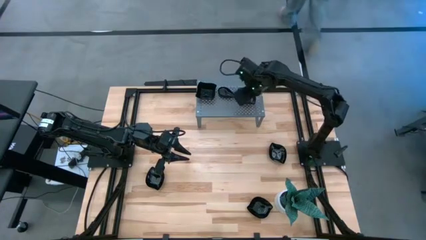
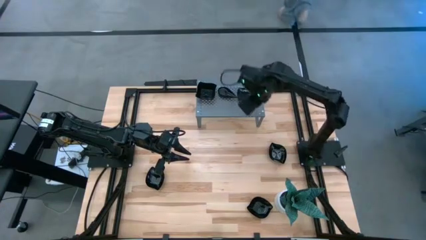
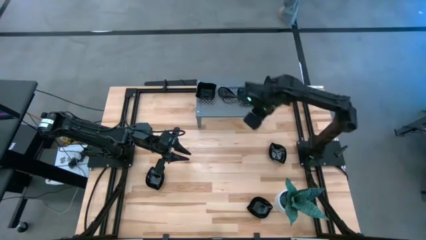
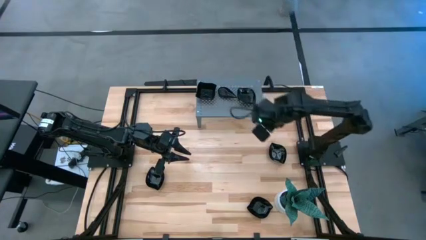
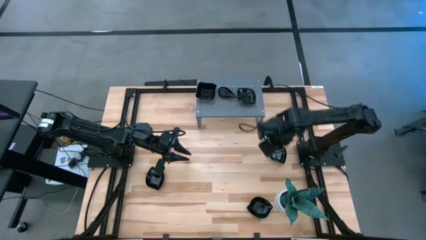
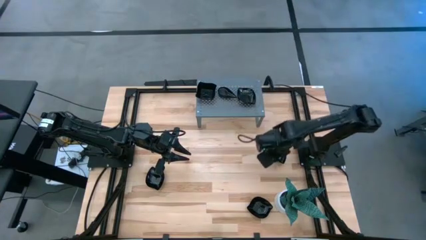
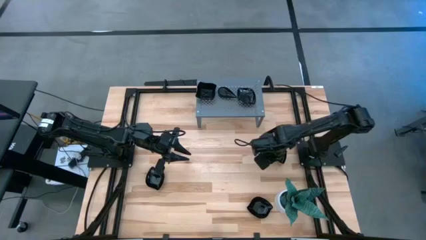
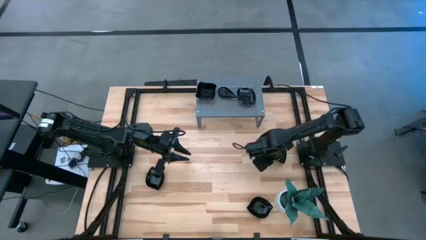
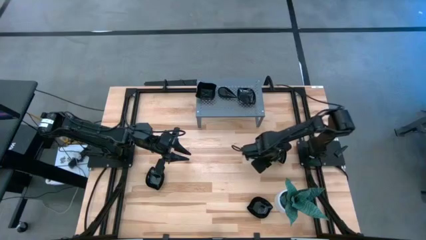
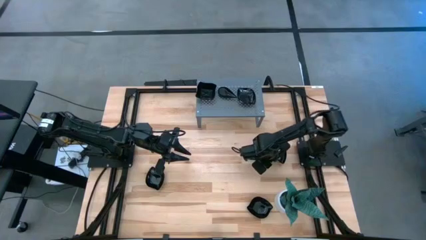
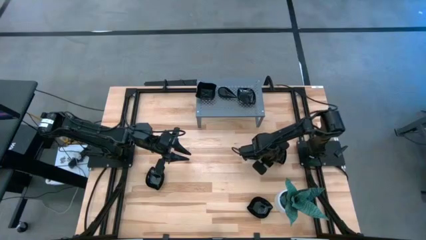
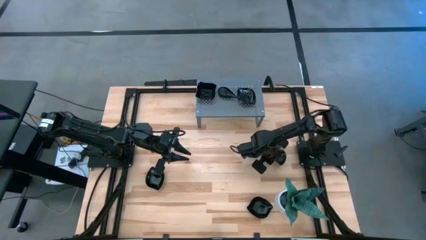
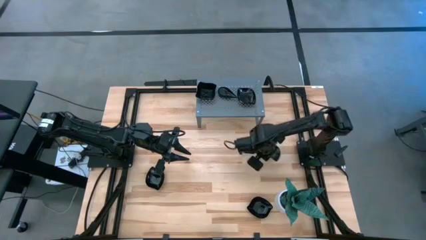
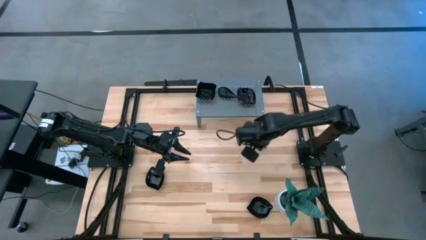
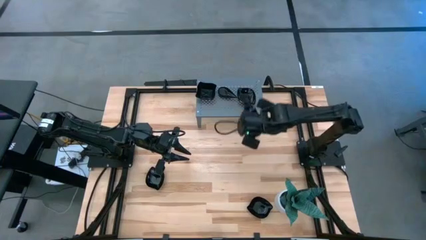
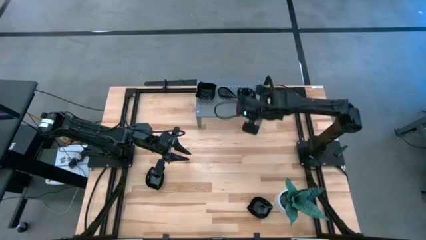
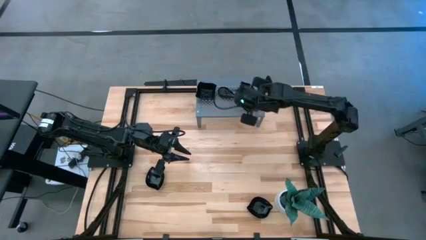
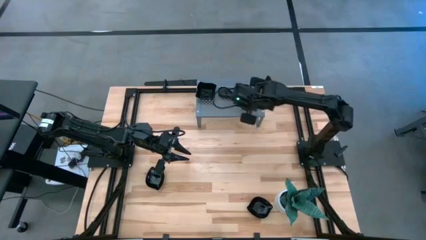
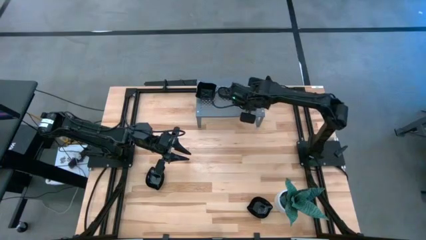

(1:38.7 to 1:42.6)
Task: Pick & Place Mini shaped plates
Stack the leaf-shaped plate on top of the leaf-shaped plate on the shelf

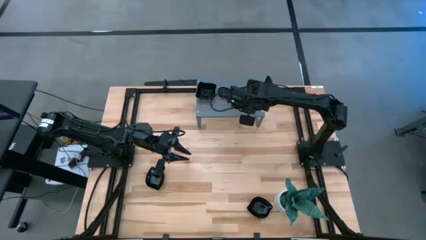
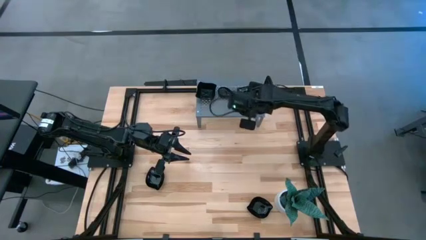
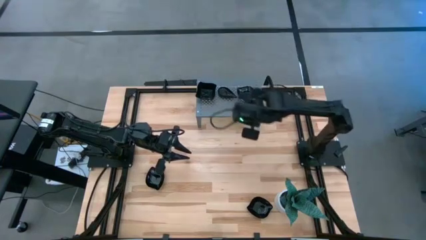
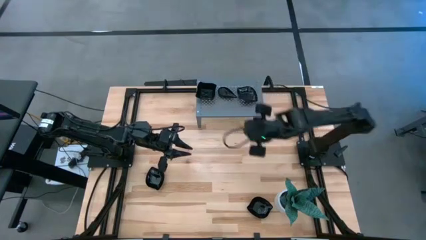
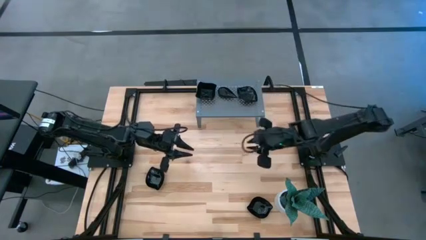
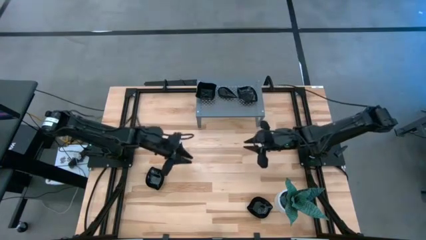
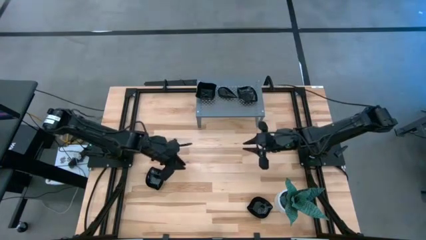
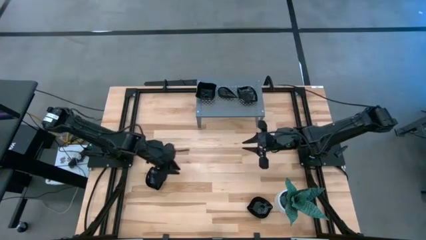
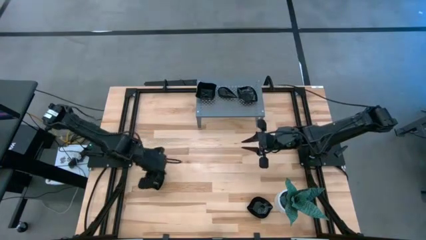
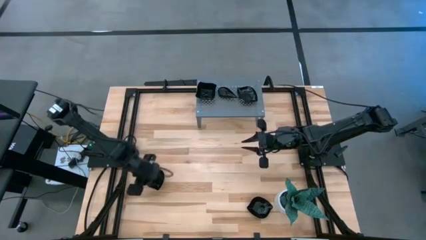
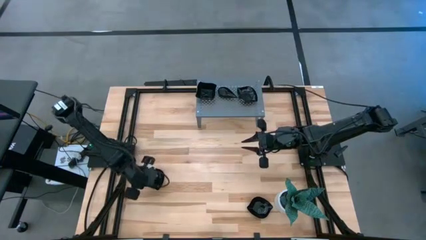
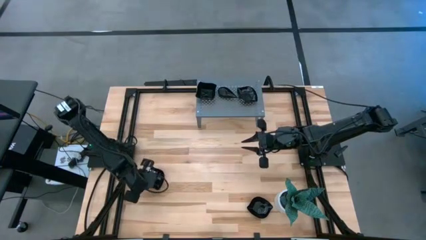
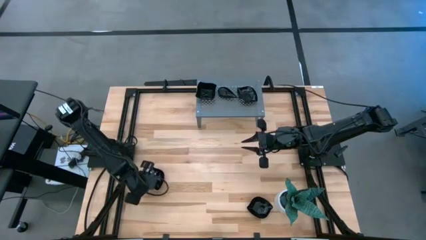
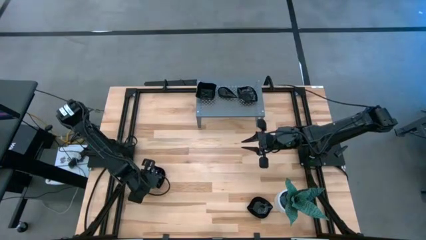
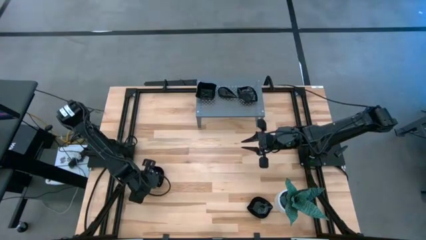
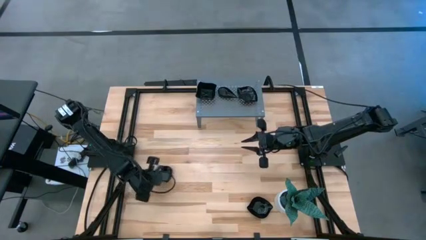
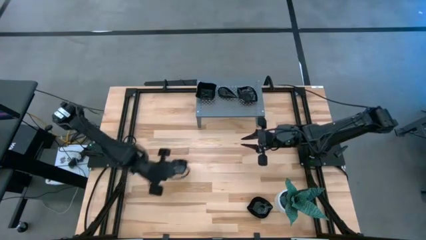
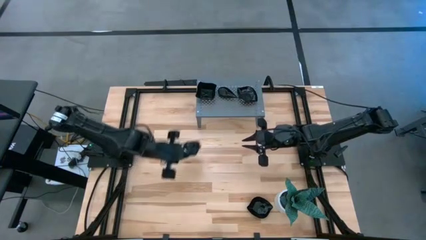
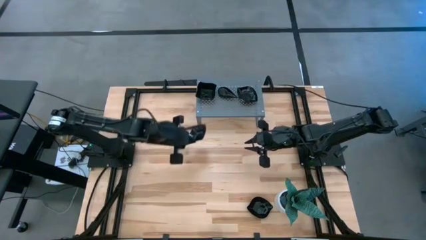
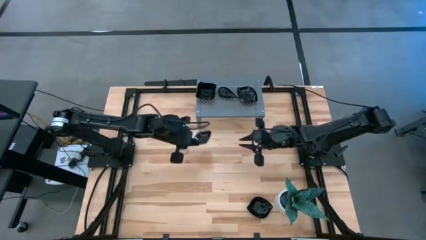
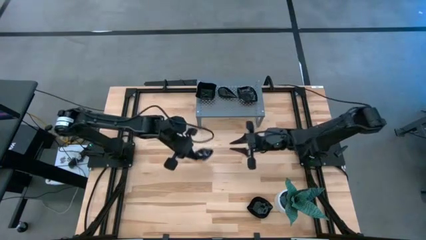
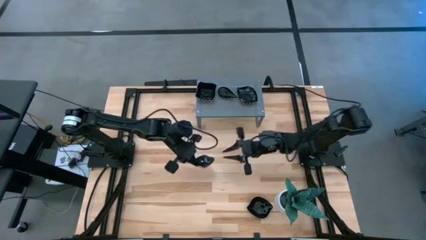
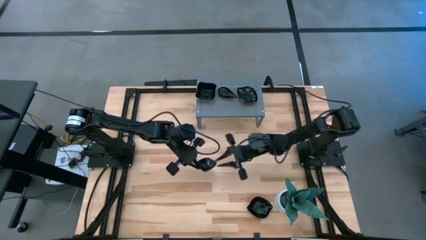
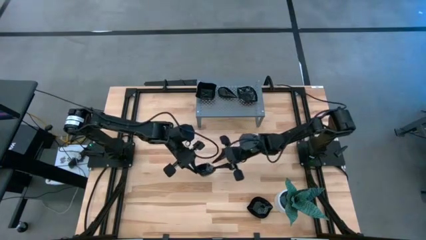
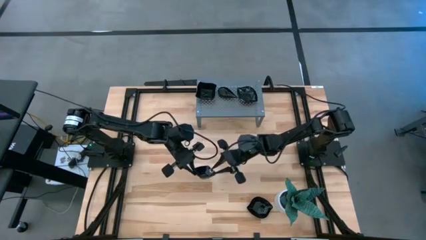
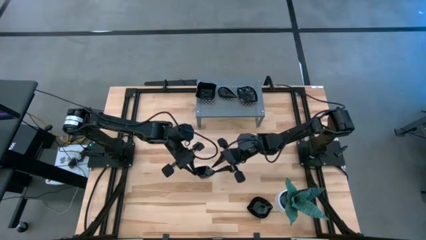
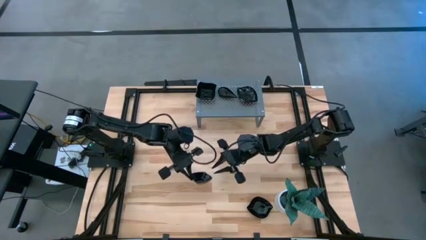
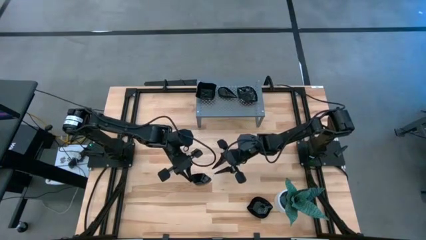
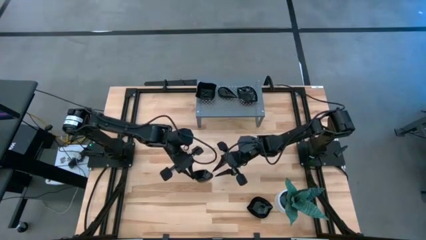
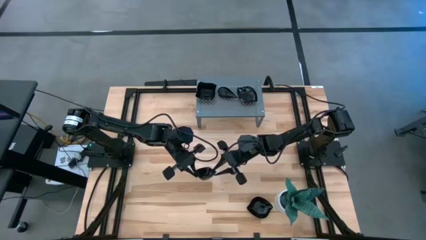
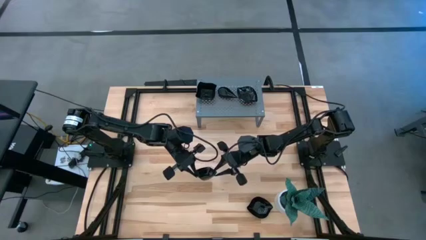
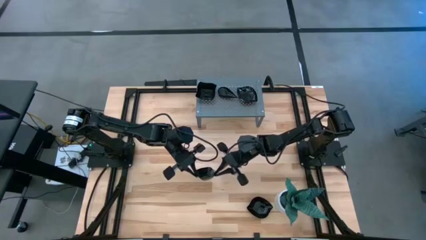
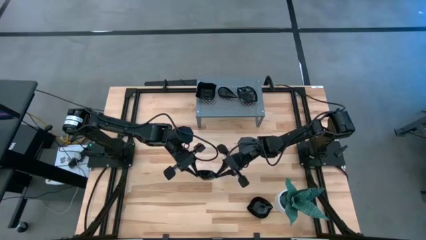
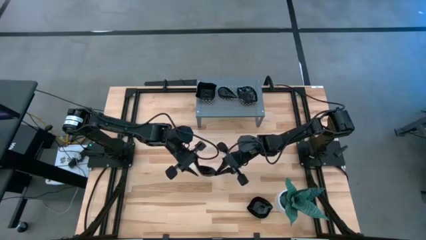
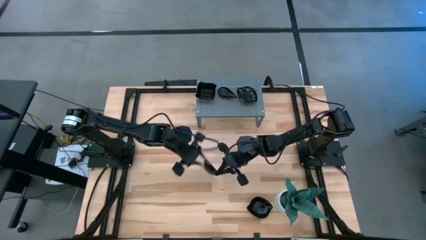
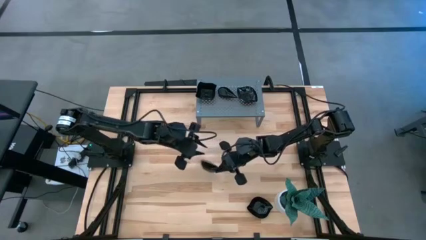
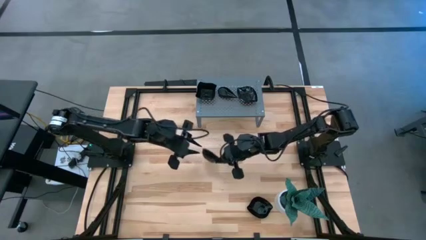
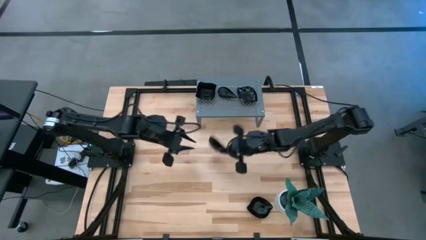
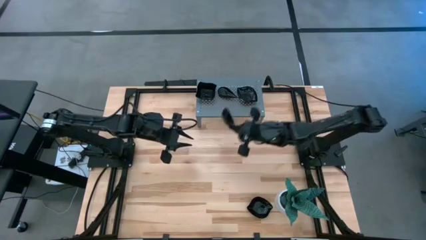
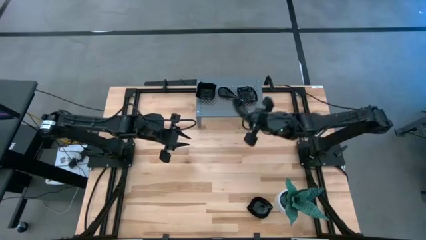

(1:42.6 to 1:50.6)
Stack the leaf-shaped plate on top of the leaf-shaped plate on the shelf

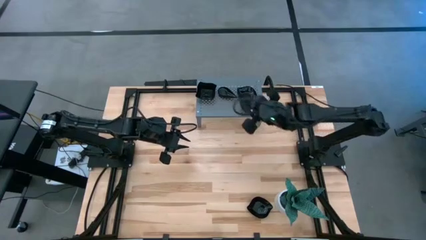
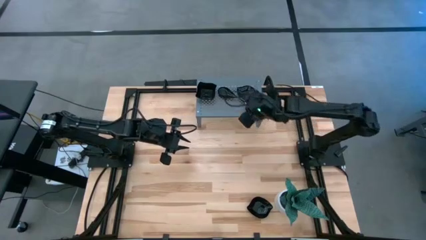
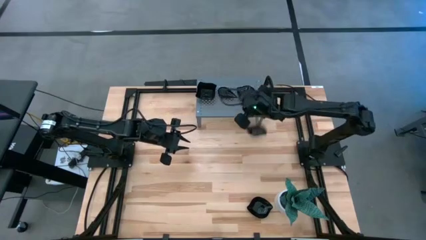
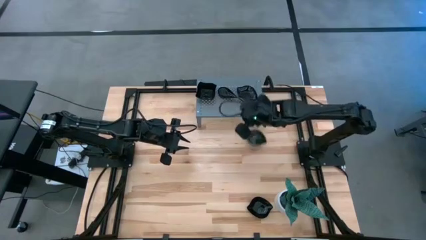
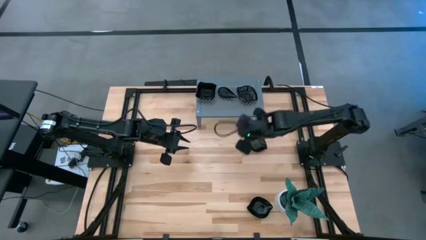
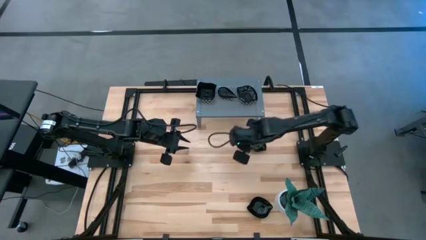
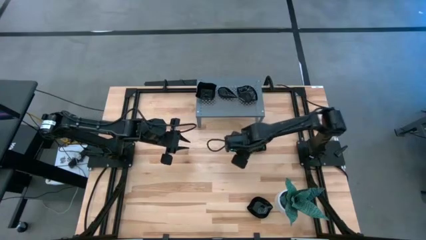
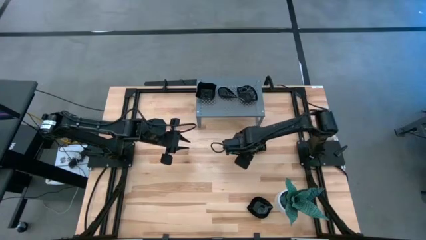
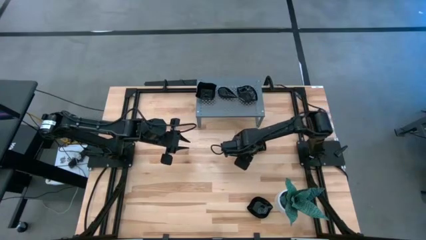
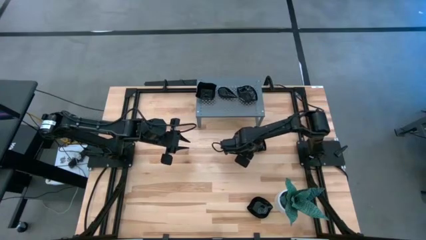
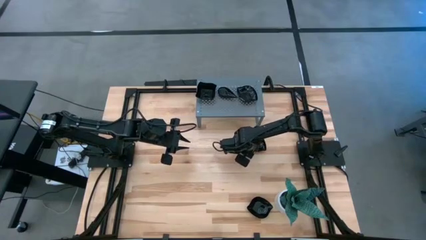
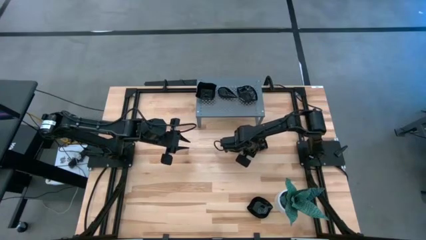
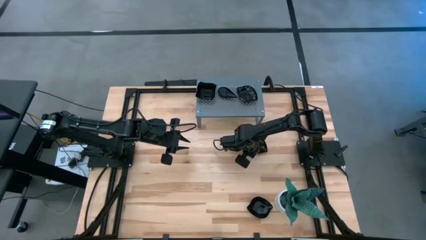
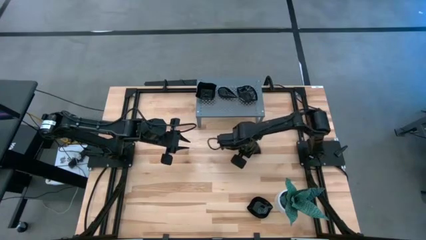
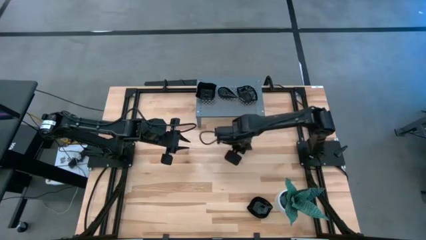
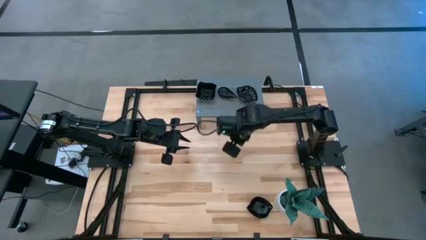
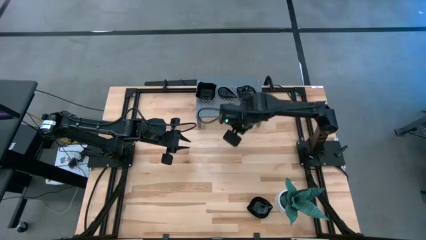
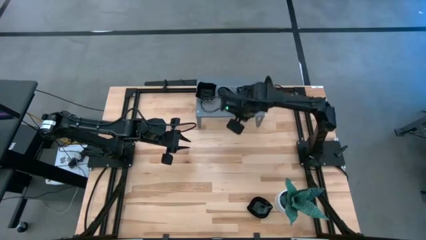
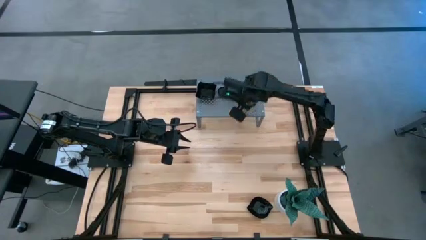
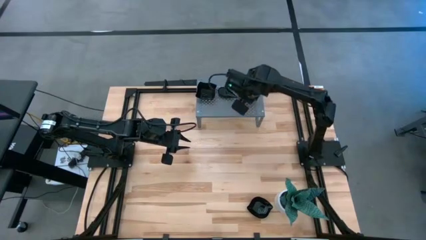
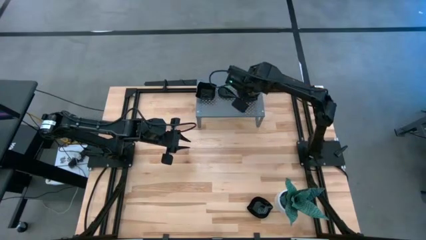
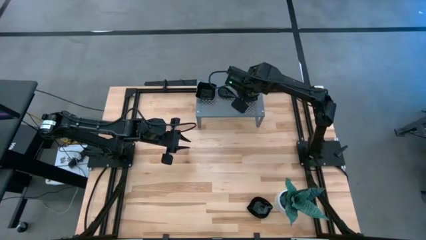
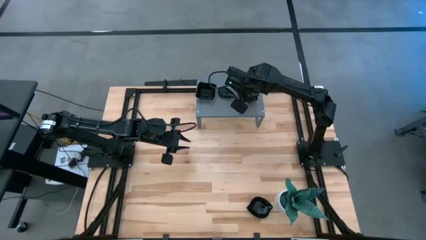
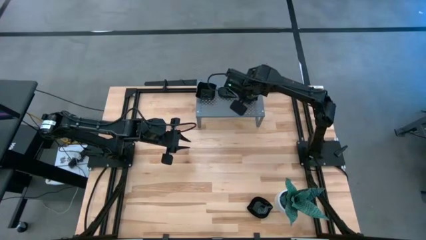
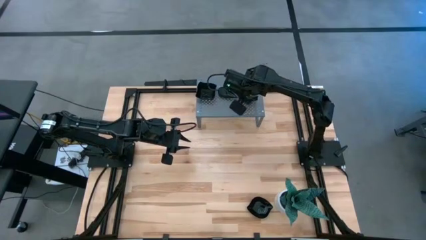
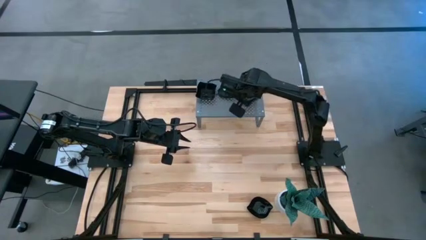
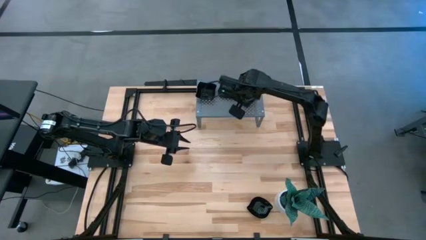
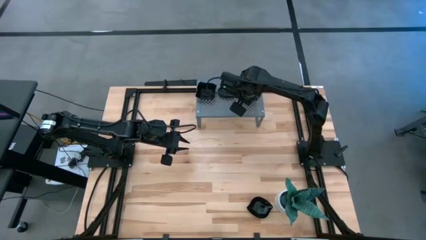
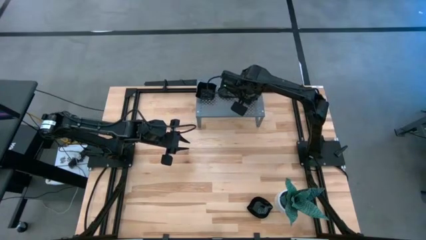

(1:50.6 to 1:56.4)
Stack the leaf-shaped plate on top of the leaf-shaped plate on the shelf
